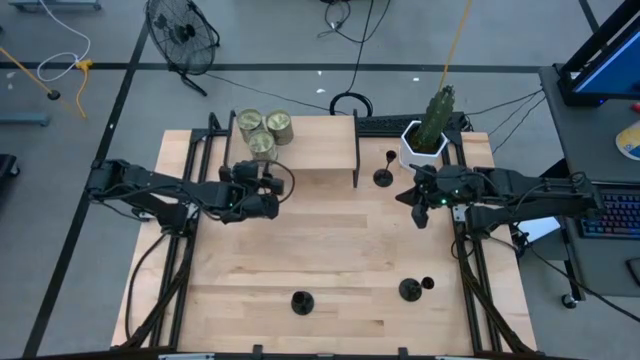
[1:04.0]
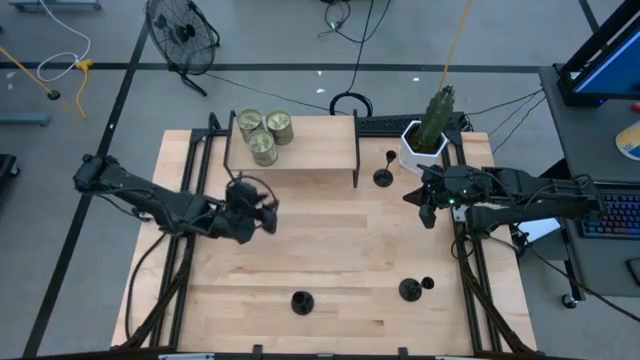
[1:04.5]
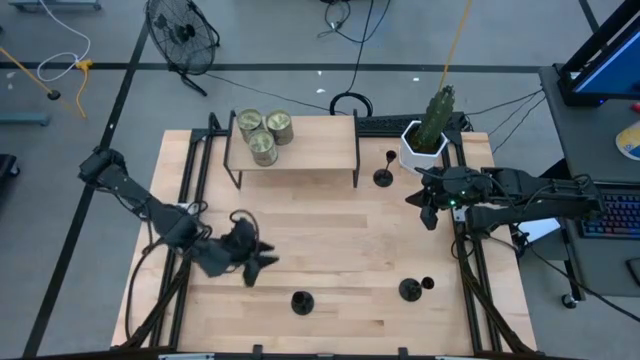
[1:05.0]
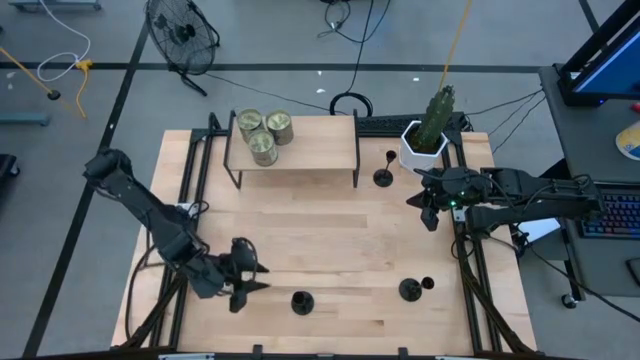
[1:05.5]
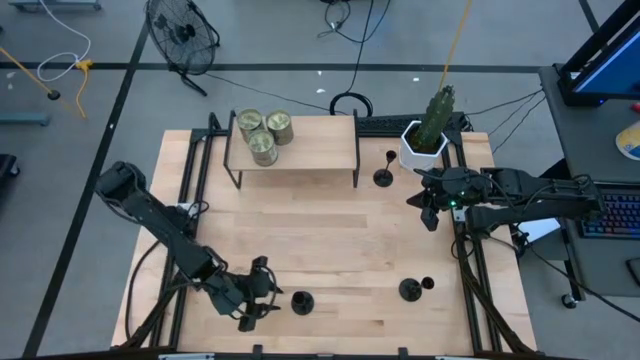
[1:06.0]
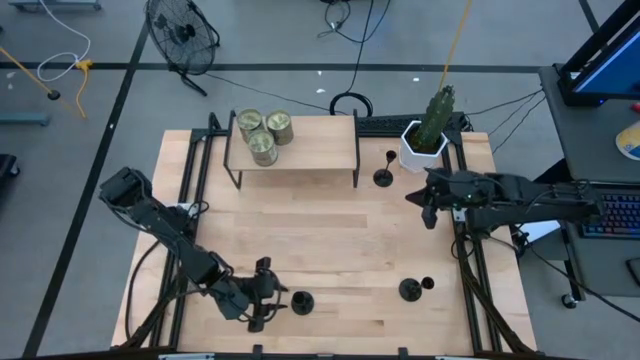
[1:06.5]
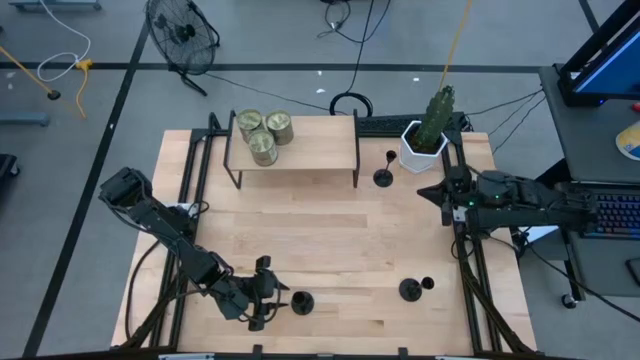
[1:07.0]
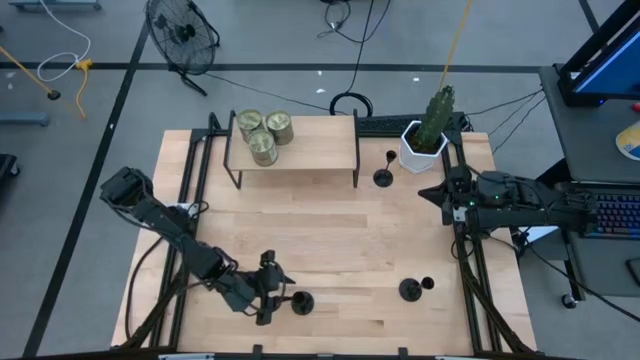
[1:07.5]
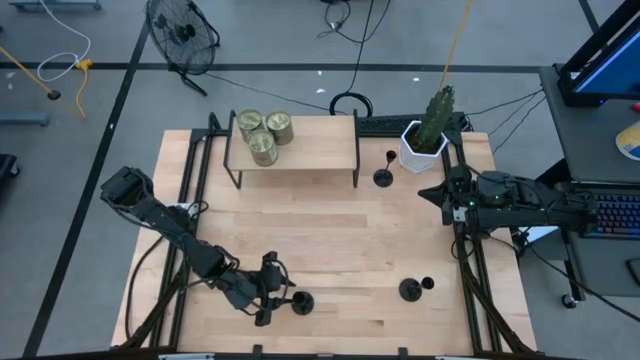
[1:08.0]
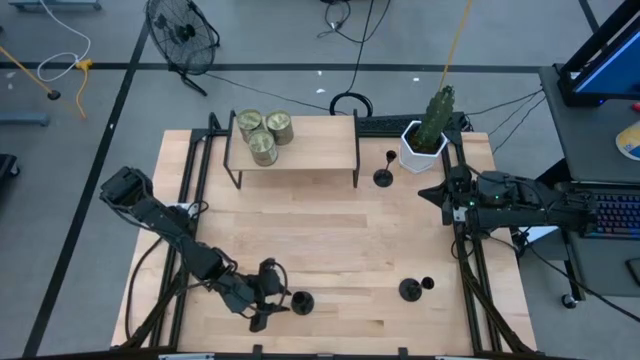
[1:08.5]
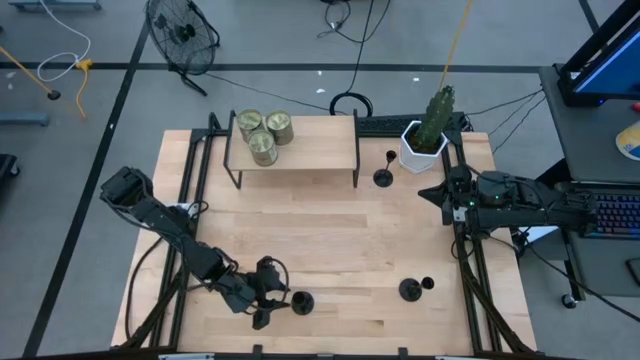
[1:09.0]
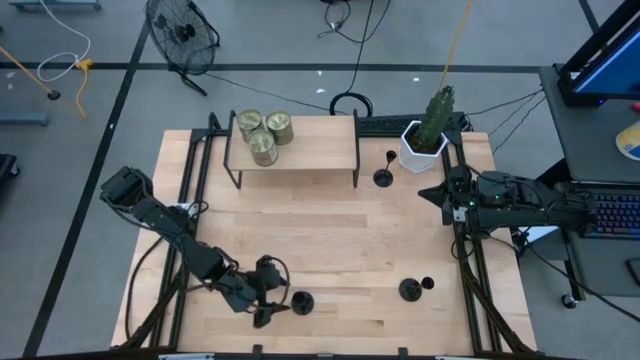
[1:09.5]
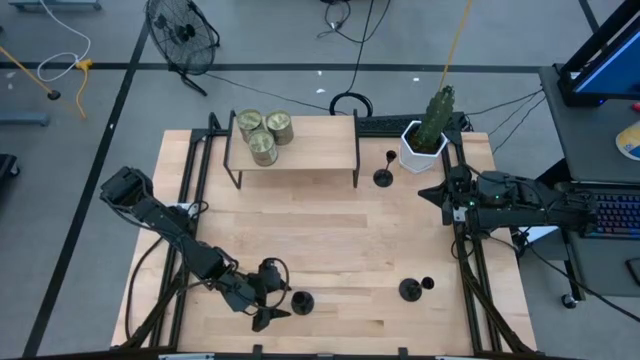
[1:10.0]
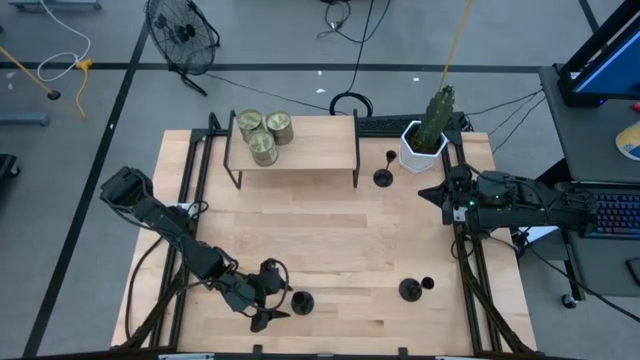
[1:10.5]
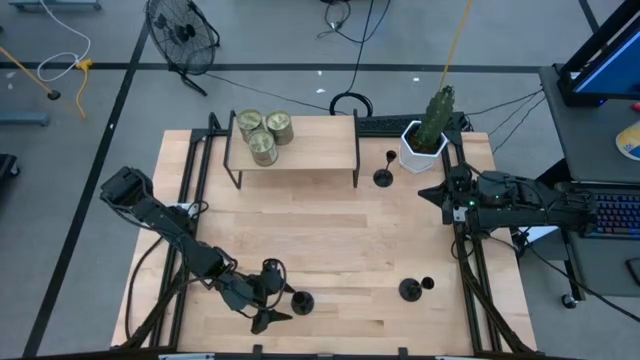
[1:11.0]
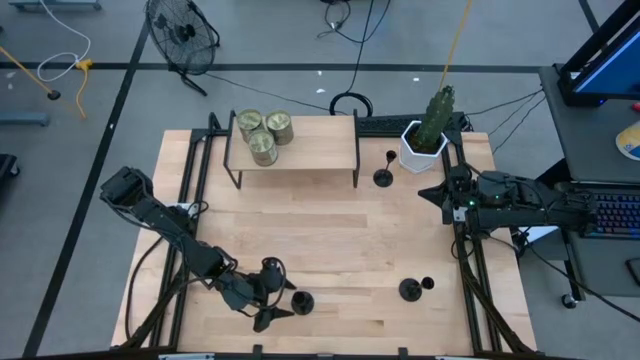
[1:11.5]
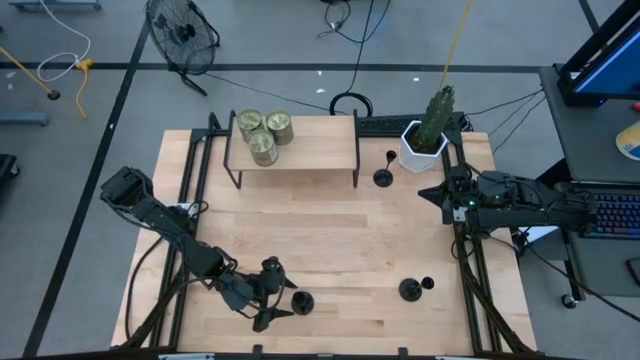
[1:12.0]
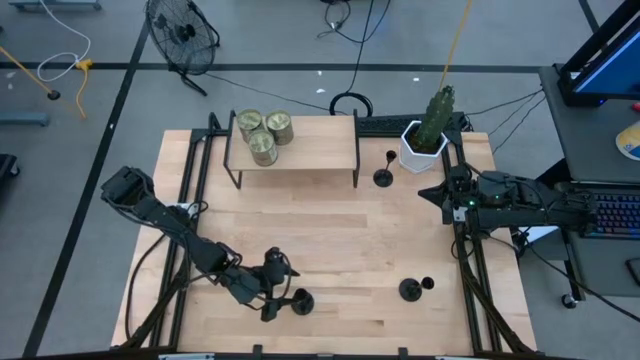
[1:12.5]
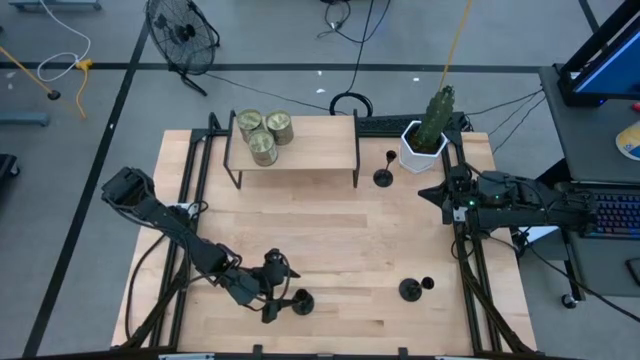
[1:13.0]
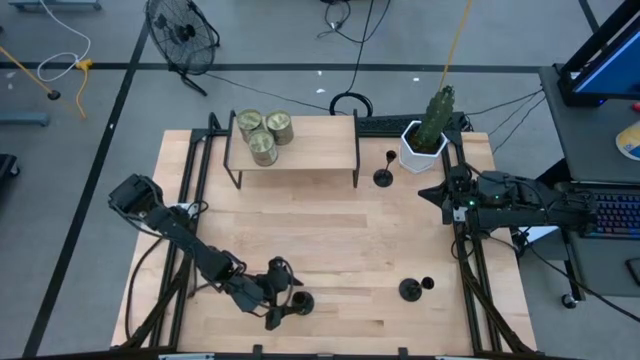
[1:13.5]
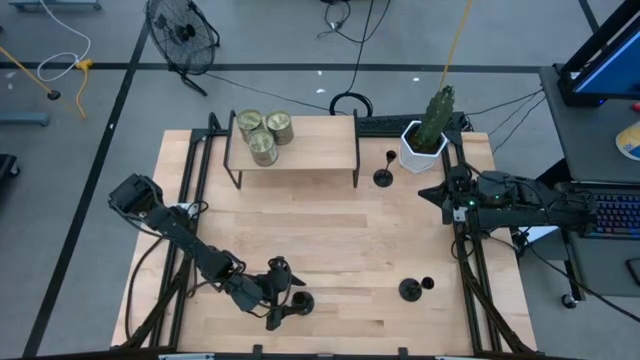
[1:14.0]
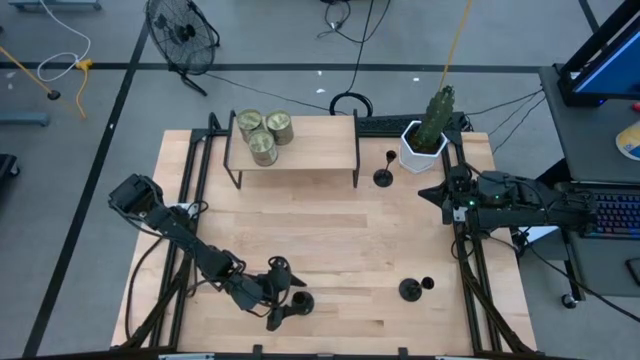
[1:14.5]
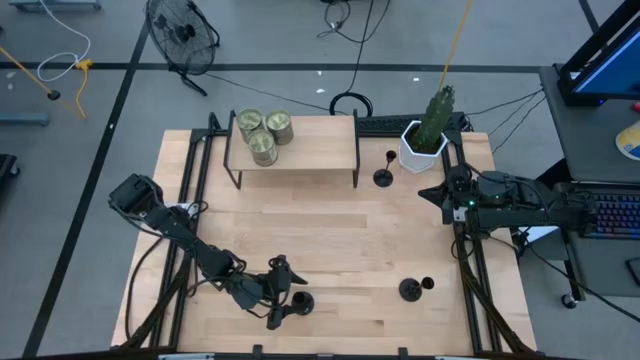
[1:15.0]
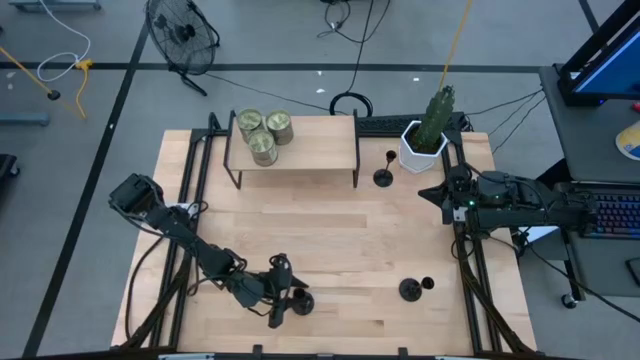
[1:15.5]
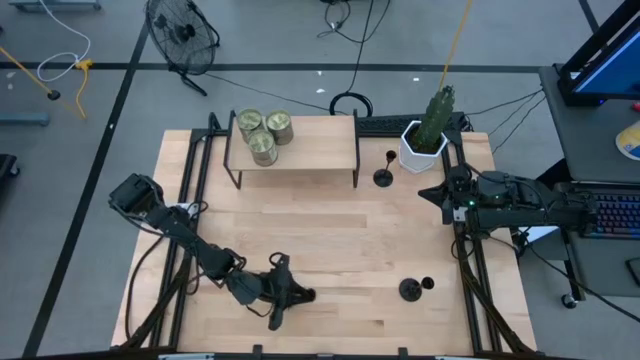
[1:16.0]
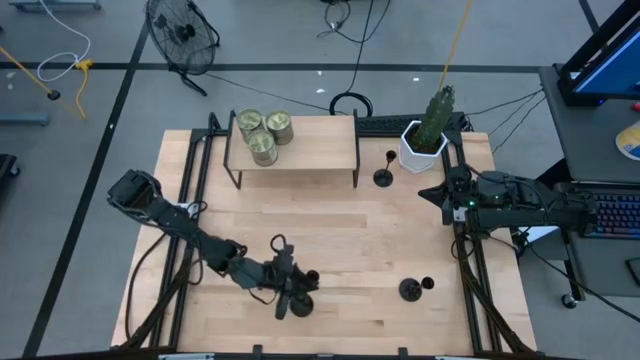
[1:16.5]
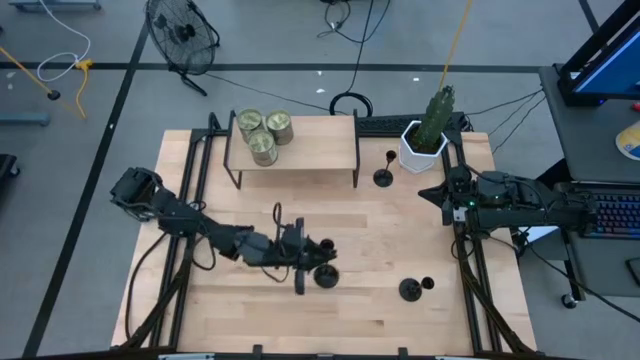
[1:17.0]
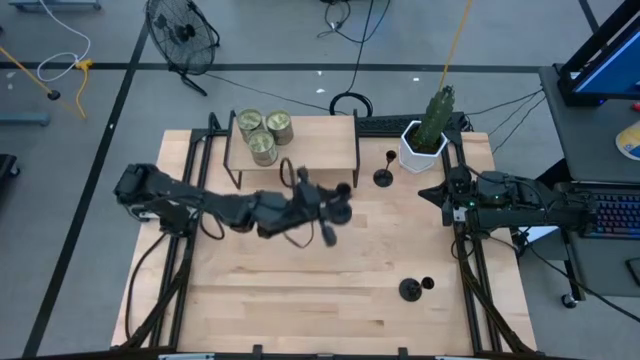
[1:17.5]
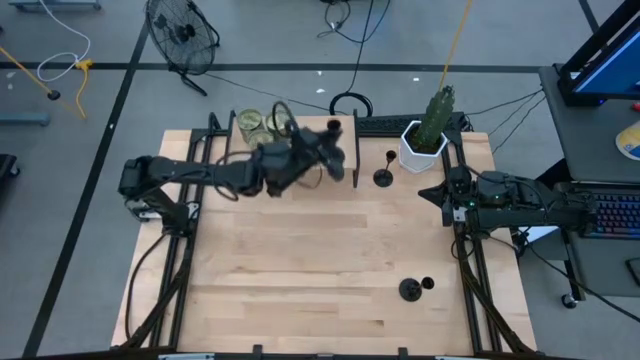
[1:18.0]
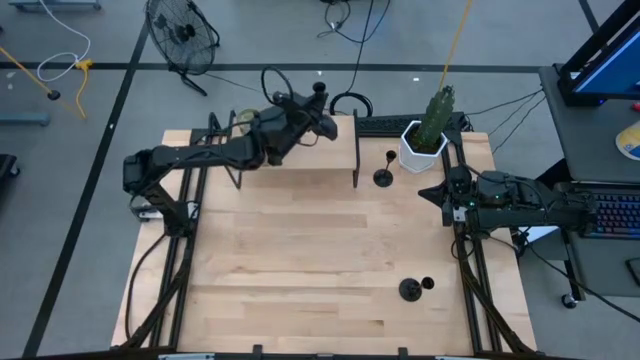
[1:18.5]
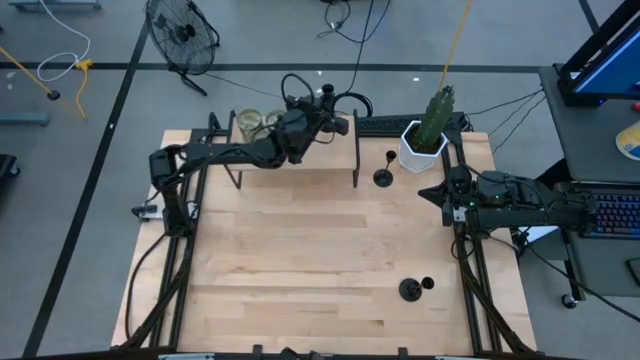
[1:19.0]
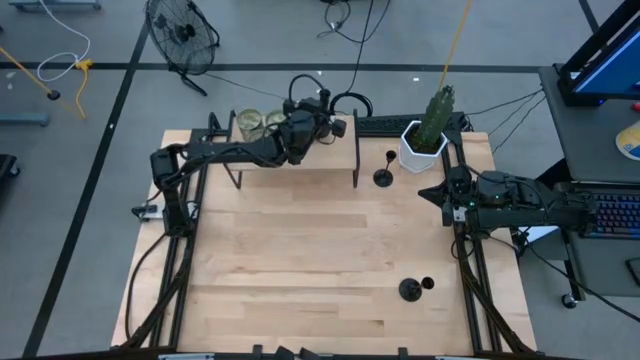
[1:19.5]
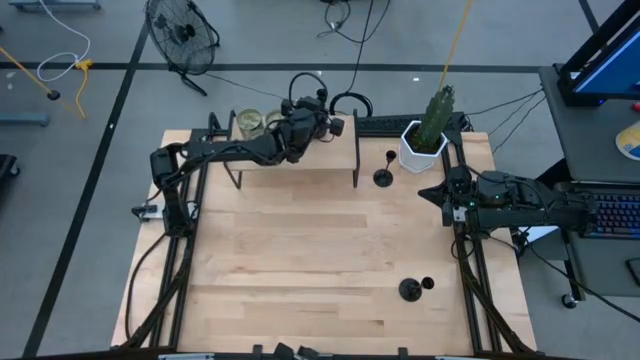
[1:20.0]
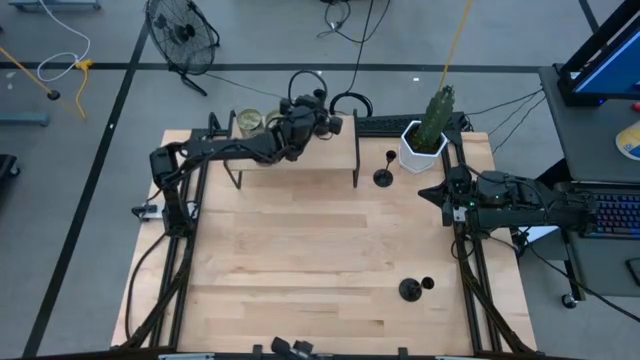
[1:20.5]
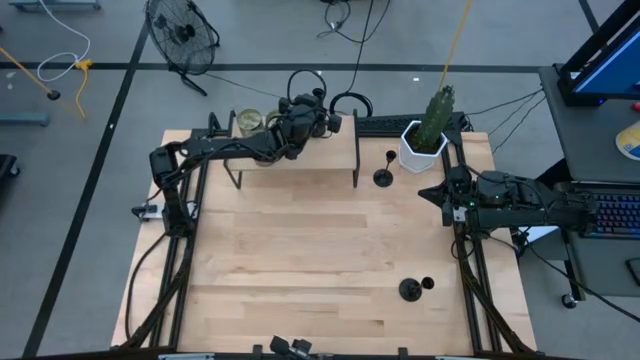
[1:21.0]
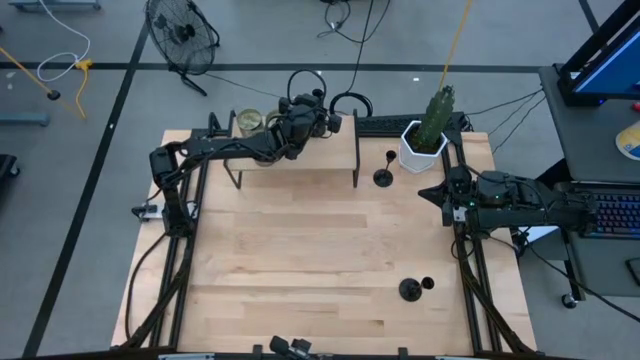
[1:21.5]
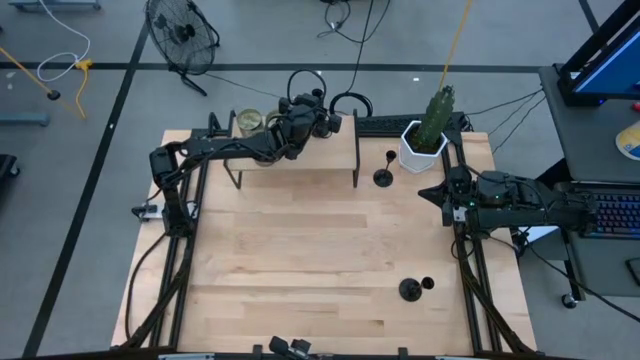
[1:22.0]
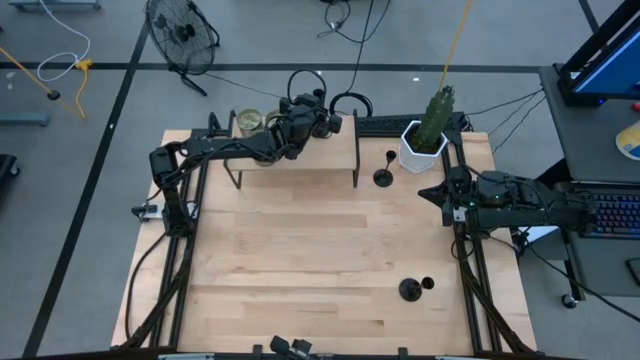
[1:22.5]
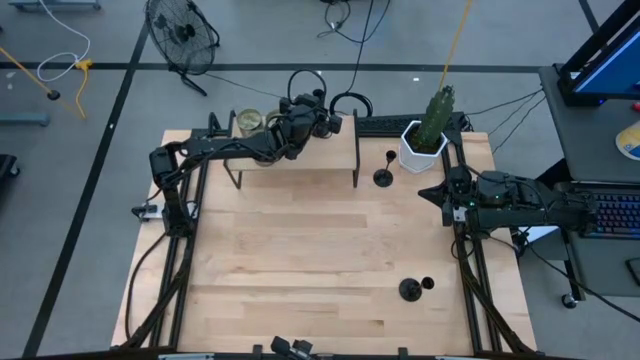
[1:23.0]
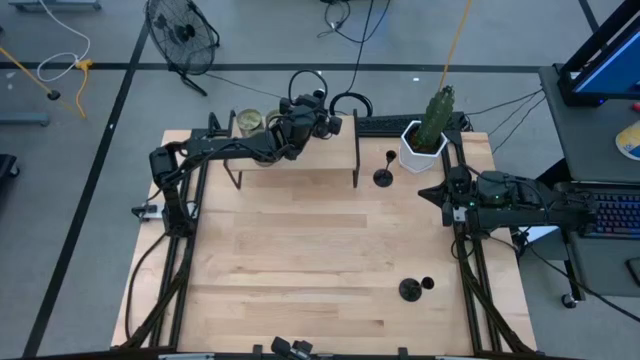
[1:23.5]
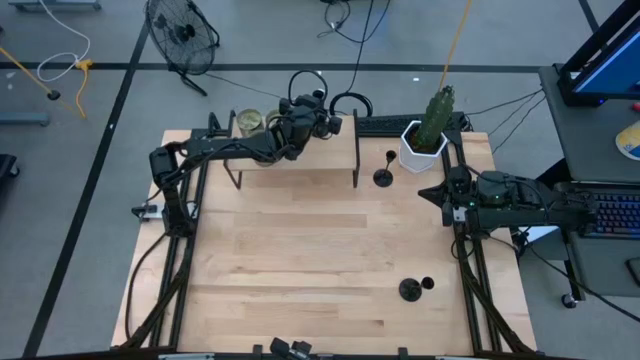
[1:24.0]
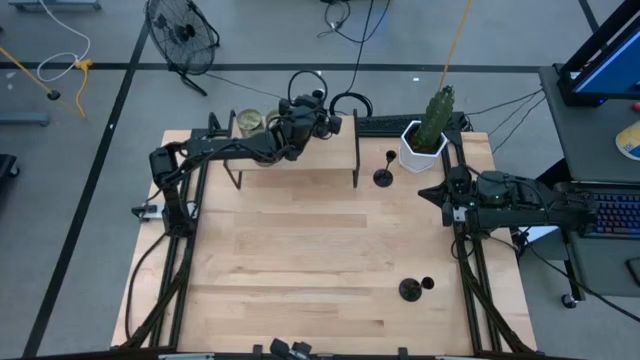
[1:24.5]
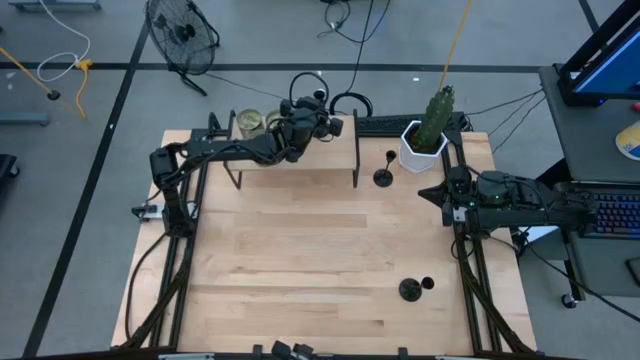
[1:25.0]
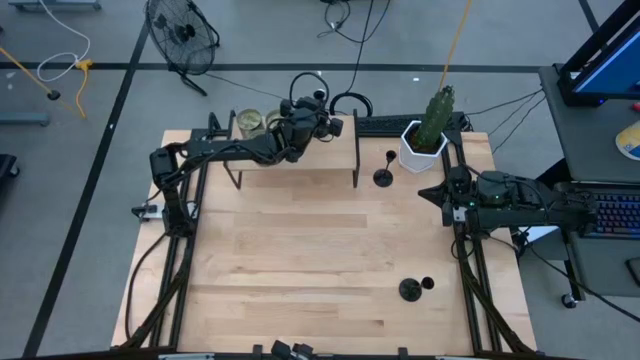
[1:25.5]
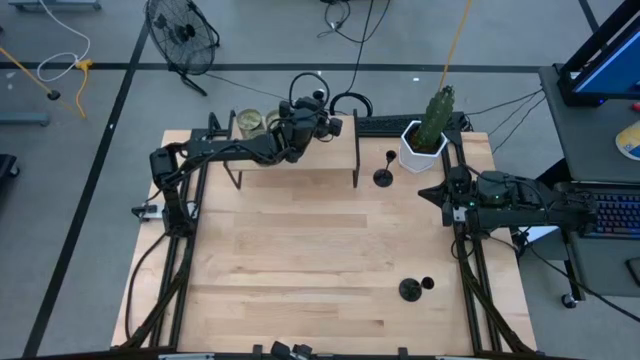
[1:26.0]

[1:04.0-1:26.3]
Task: Pick & Place candle stick holders
Put the bottom left black candle holder on the shelf
